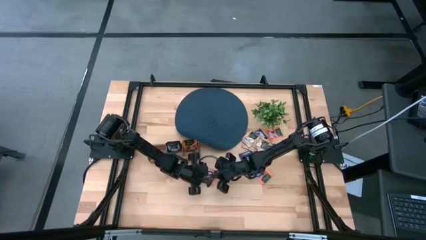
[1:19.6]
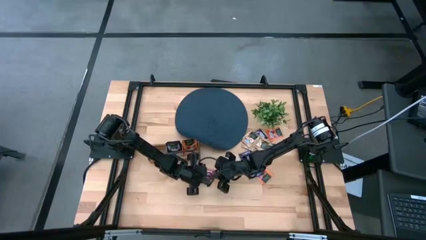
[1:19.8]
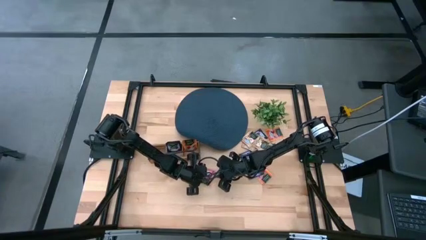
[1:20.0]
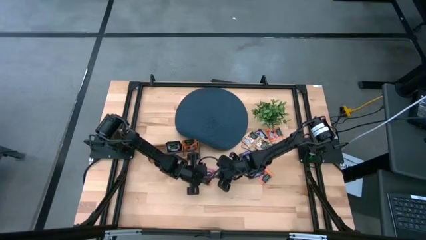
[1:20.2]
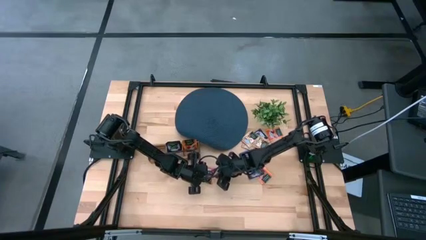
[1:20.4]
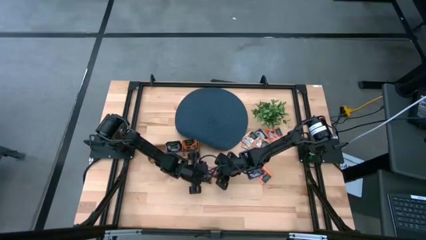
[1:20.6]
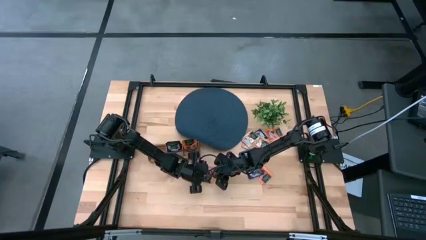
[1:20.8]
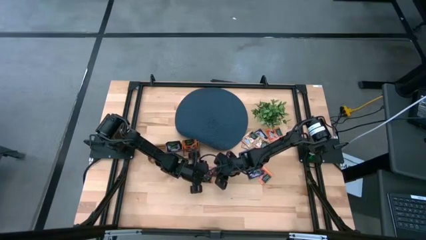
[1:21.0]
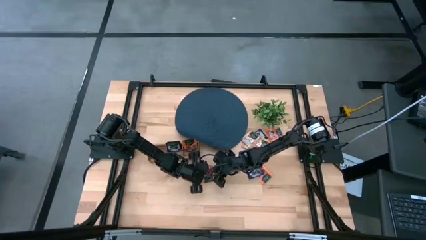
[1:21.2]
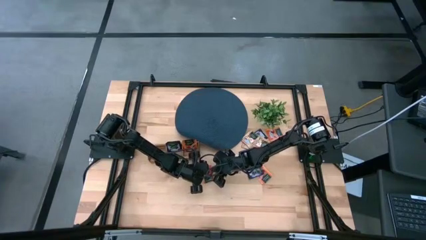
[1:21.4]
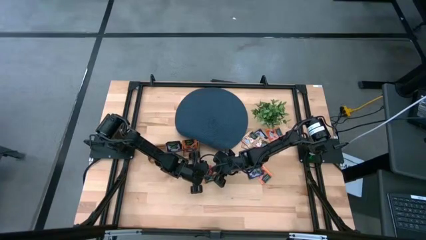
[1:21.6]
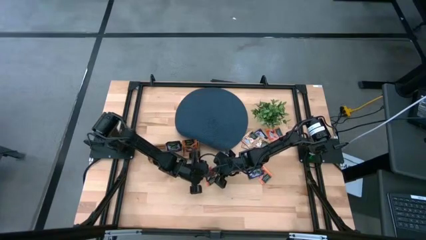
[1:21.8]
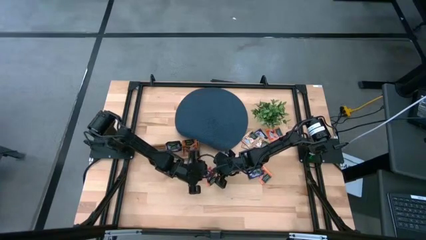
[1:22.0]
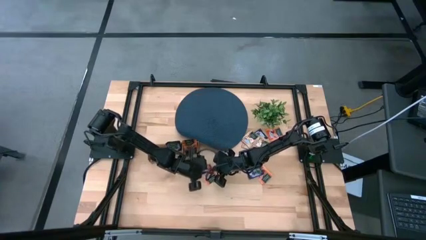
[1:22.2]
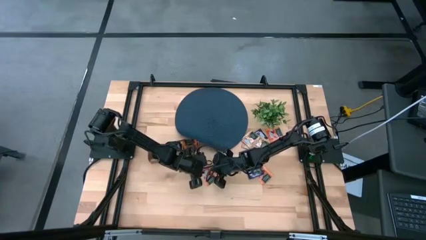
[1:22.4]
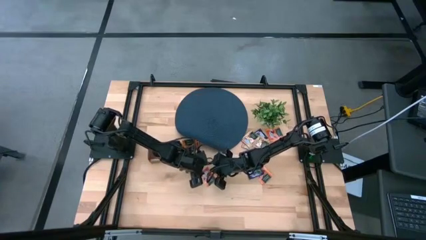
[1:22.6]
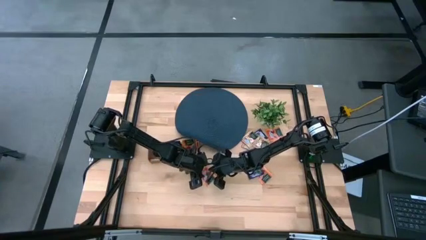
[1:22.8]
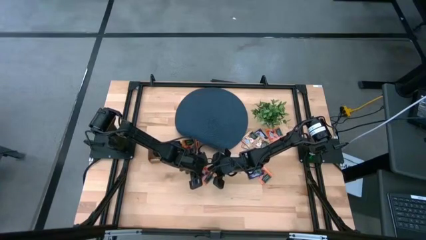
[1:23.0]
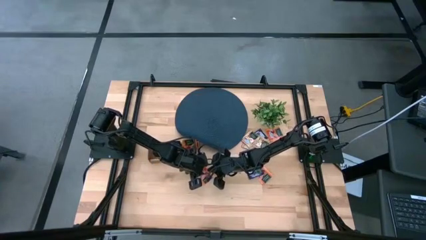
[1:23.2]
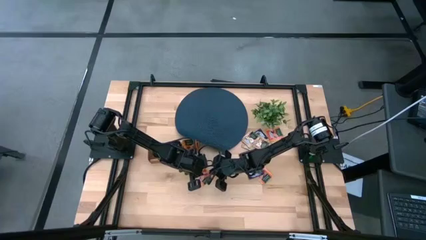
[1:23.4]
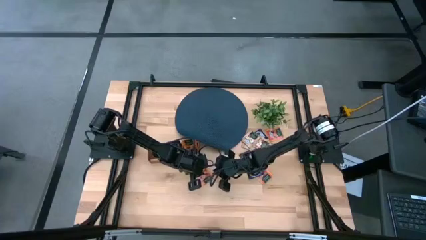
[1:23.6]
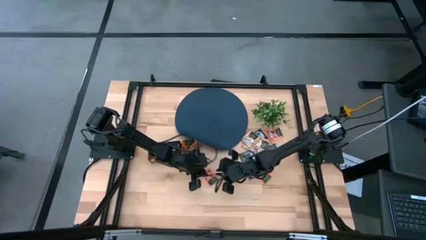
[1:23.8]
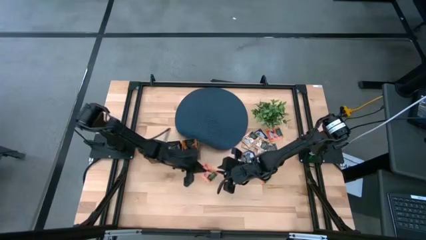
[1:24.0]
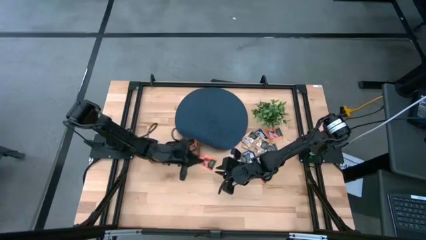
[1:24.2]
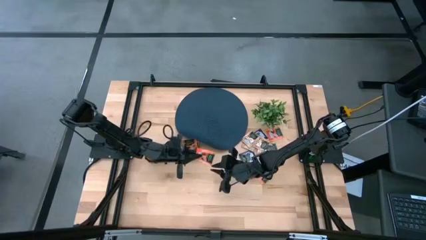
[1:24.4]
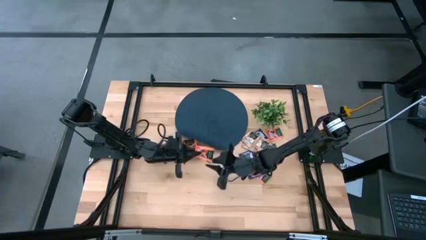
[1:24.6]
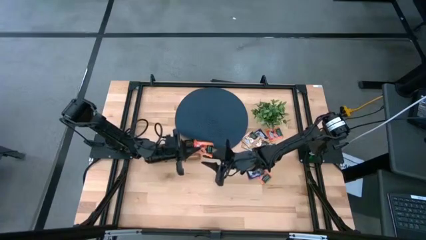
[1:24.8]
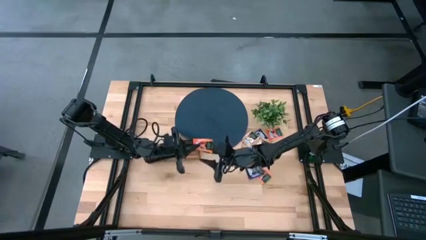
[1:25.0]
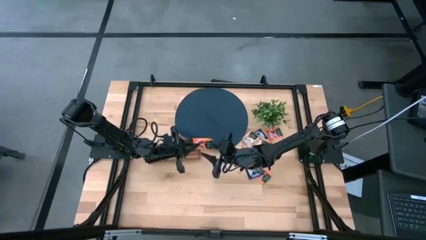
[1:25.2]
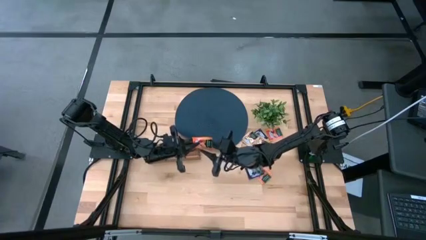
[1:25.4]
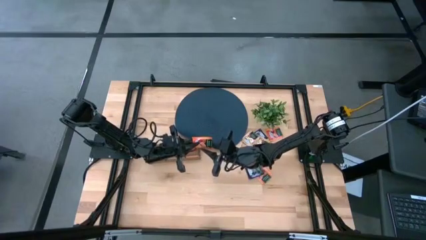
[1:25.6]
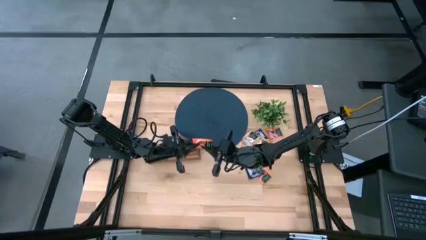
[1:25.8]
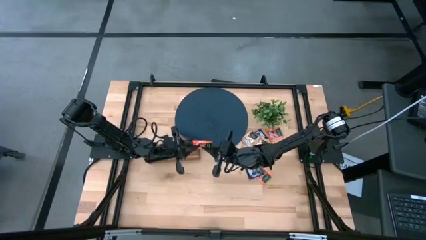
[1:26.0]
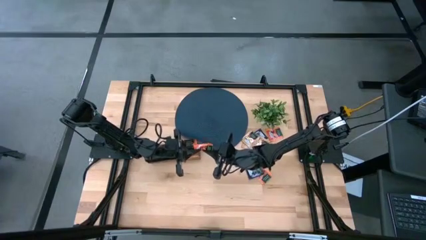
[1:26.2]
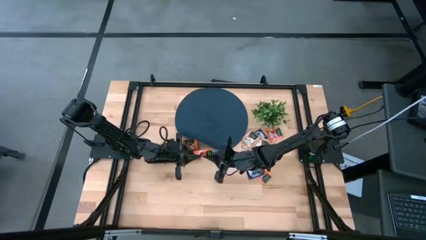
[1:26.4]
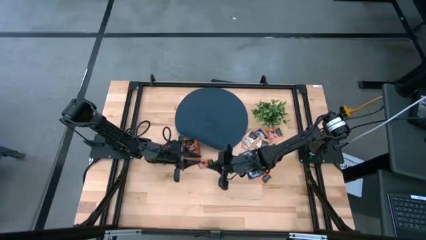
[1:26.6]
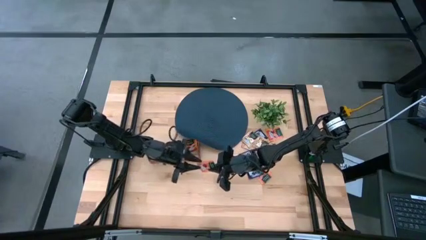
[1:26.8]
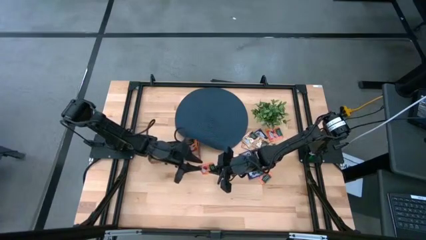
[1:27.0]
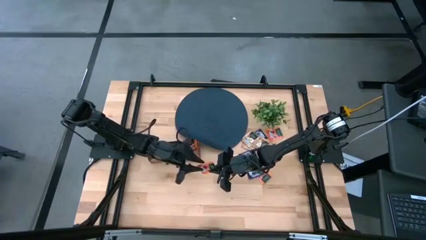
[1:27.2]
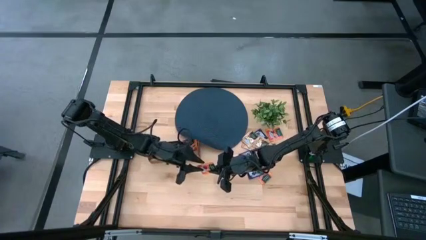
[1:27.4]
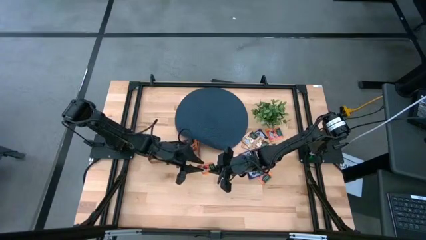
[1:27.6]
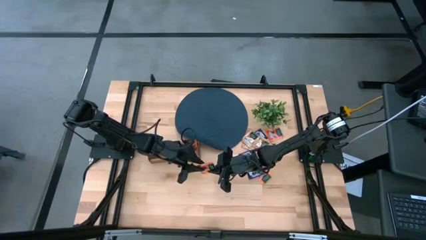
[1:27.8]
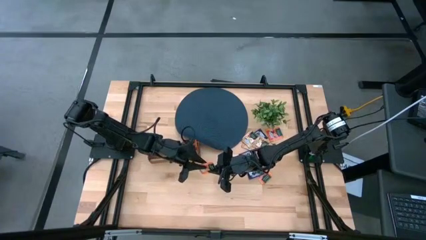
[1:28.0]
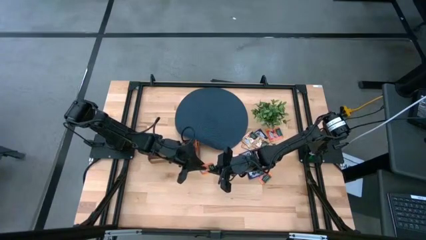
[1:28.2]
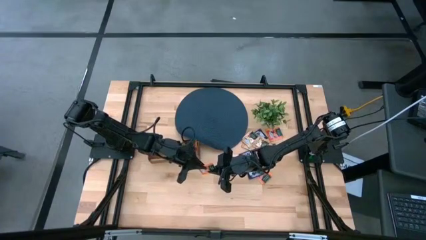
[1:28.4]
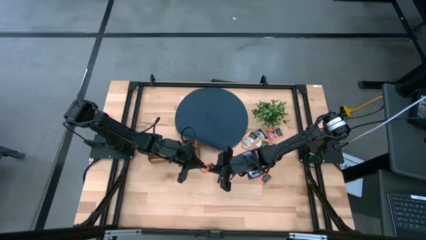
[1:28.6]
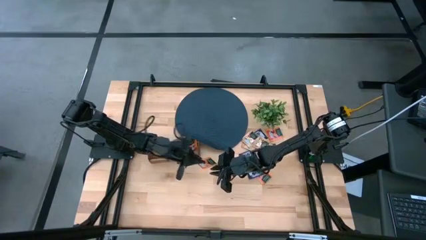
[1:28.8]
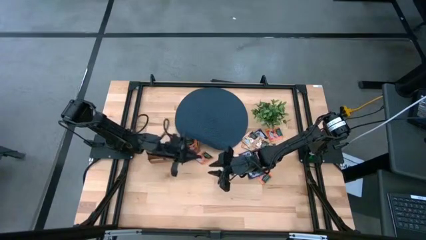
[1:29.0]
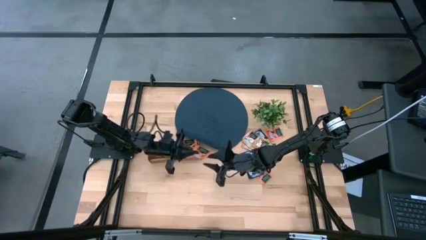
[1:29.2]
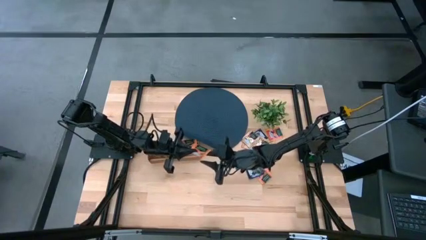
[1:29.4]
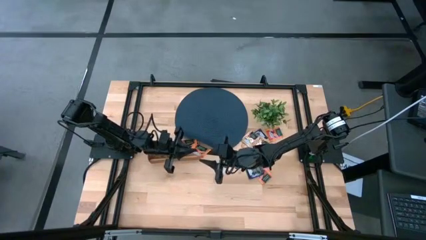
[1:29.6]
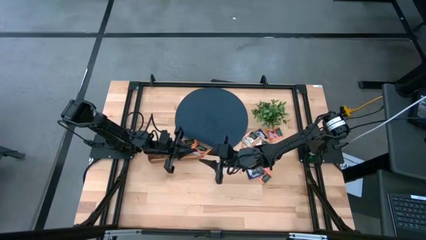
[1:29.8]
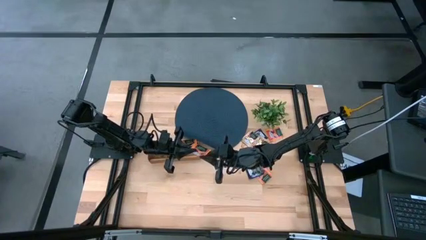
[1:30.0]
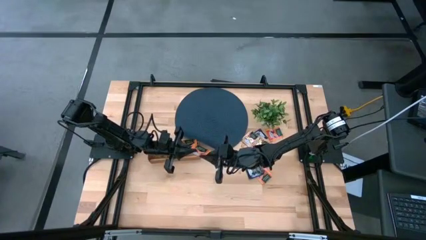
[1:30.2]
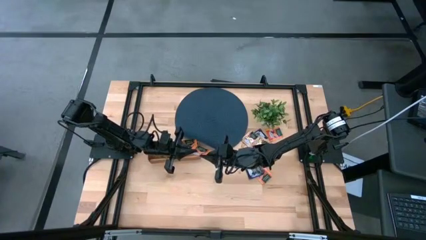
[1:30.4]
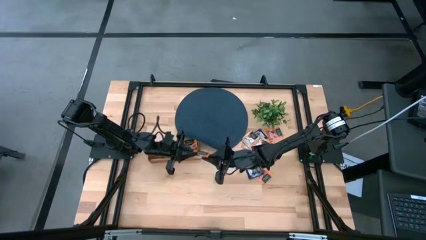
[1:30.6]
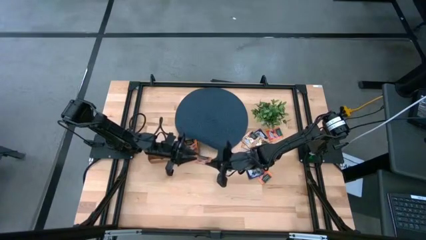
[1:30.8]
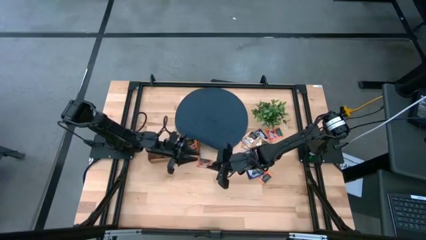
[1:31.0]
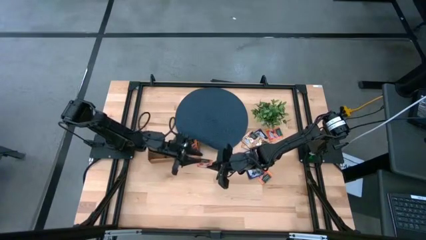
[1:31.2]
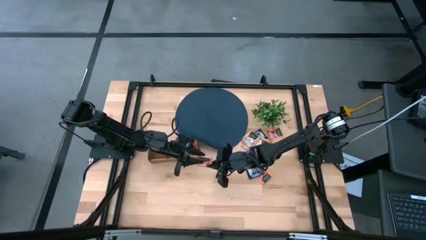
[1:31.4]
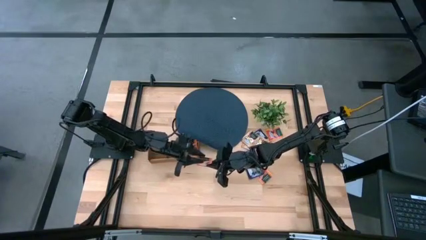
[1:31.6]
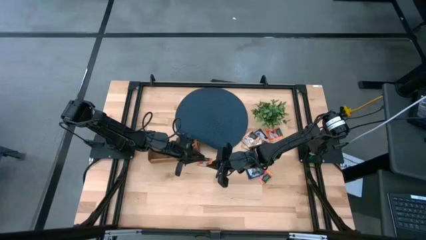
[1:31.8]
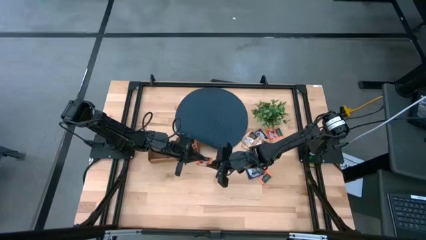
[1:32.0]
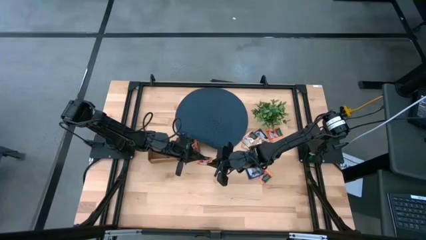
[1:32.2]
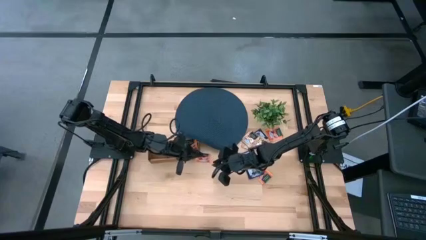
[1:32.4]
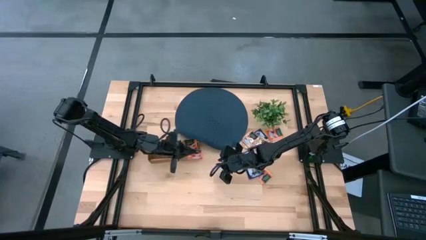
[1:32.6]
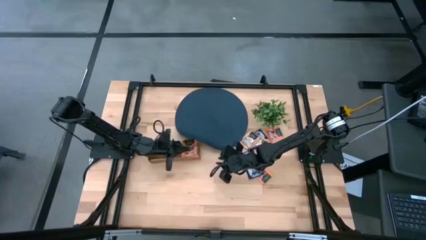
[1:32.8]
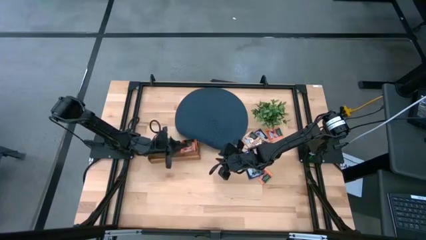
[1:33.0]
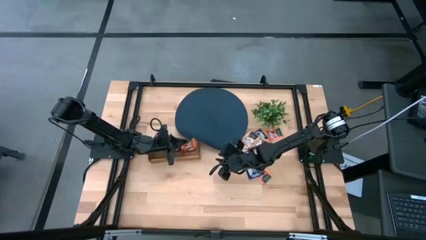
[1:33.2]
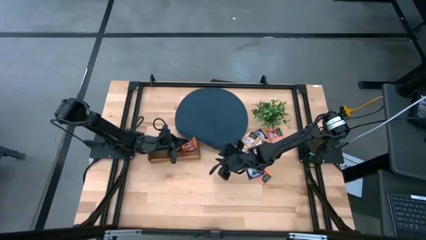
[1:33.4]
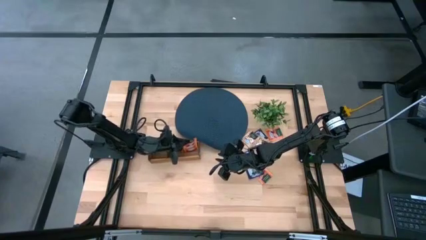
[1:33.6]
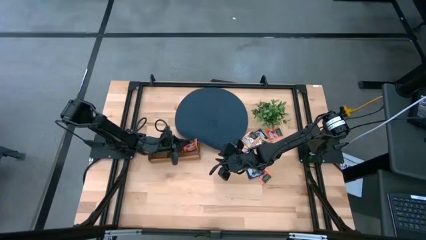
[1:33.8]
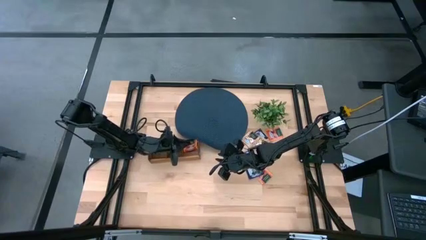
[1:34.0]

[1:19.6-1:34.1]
Task: Pick & Place Tea
Put the orange tea bag into the right section of the wooden organizer

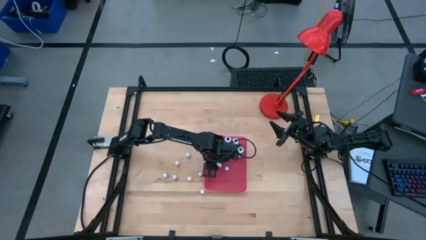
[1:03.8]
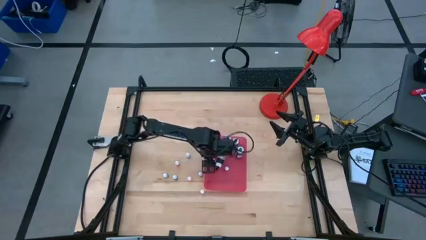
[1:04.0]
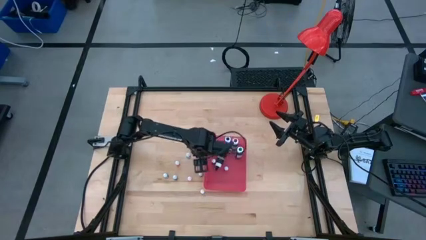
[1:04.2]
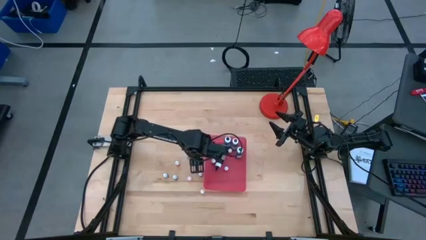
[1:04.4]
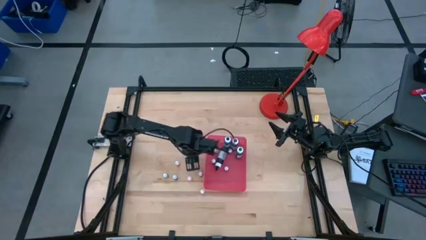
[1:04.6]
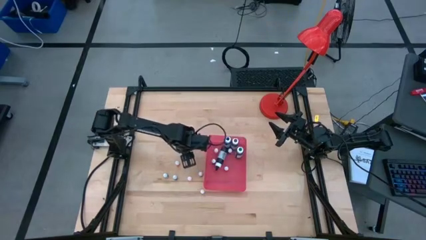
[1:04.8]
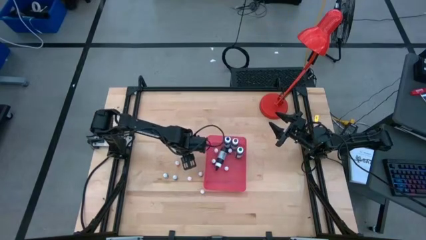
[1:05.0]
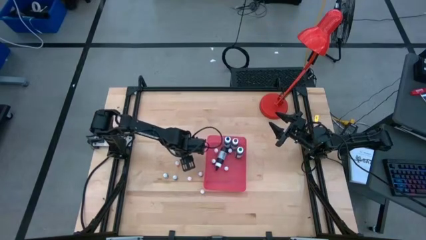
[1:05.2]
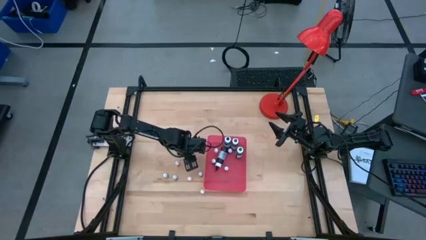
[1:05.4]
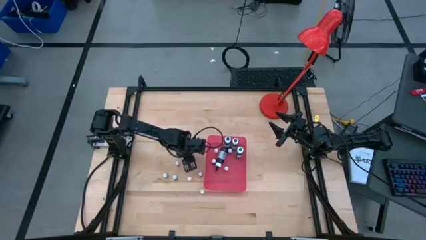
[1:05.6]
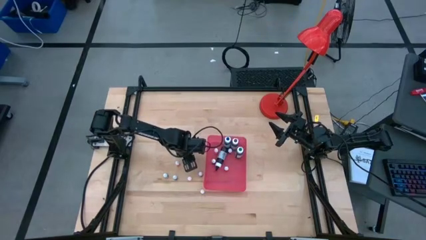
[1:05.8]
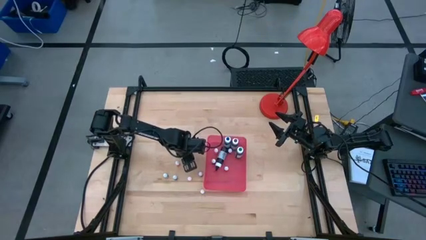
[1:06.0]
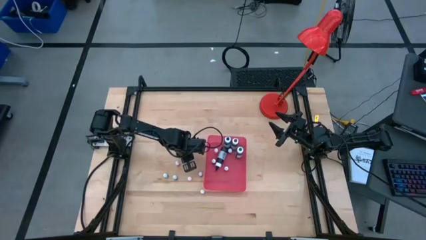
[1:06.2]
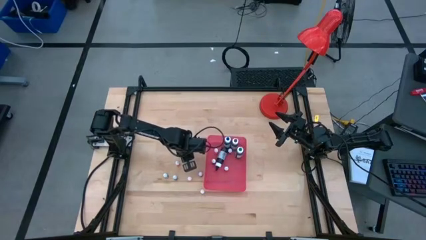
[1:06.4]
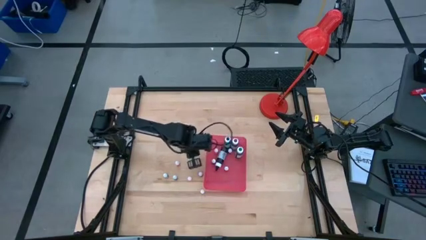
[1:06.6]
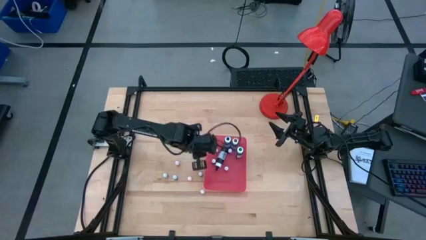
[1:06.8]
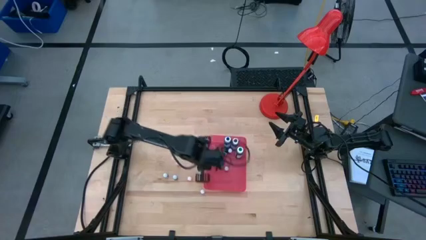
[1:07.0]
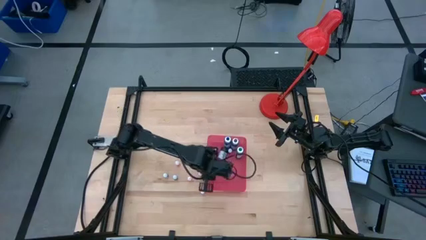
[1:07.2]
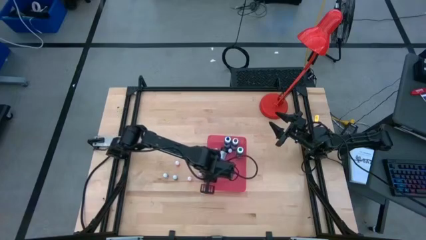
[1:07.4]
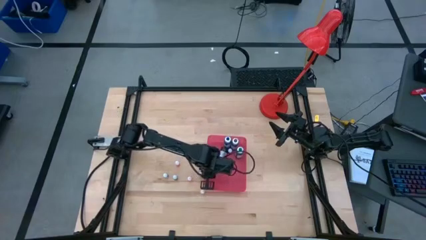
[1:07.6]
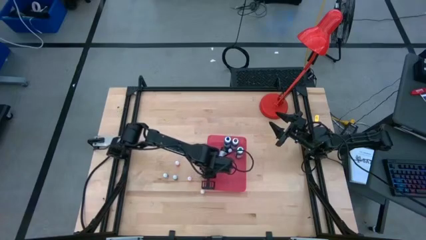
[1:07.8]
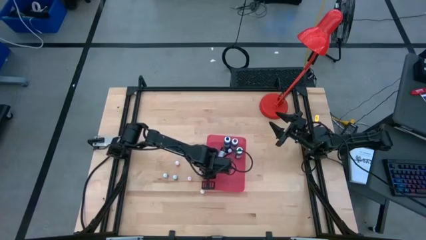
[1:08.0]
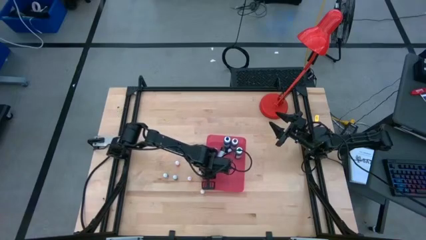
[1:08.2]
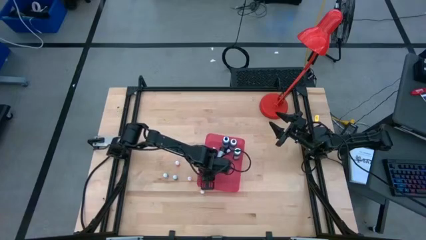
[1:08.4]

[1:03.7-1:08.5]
Task: Pick & Place food coloring
Put the small black food coloring bottle into the red bin
